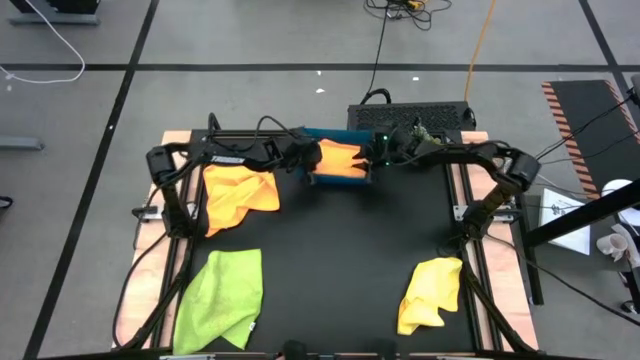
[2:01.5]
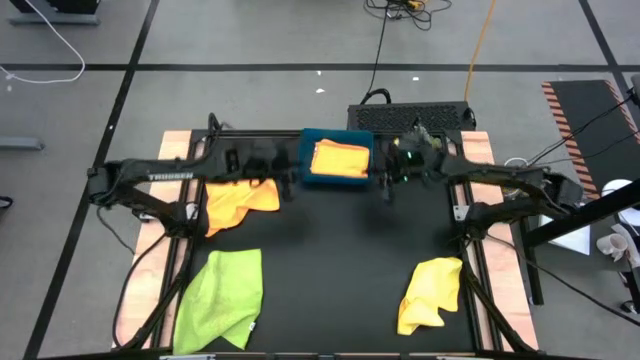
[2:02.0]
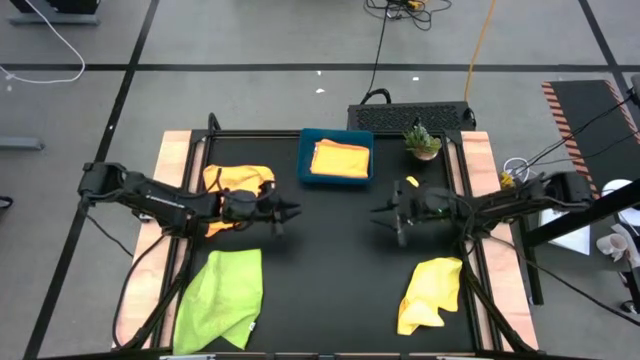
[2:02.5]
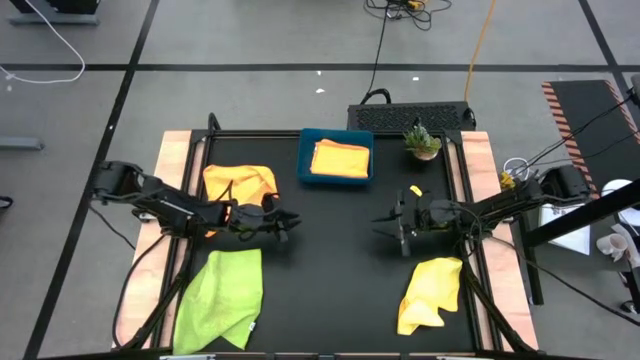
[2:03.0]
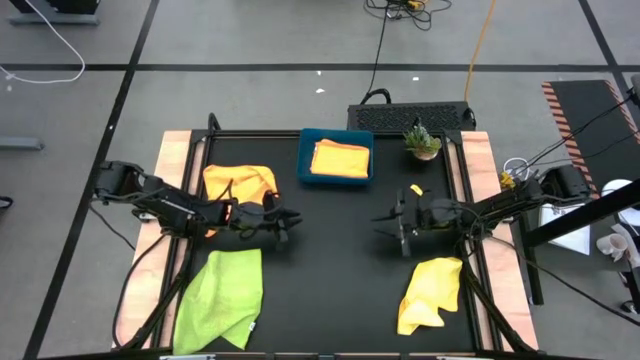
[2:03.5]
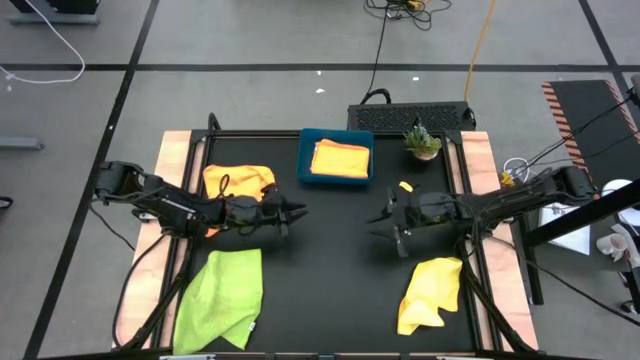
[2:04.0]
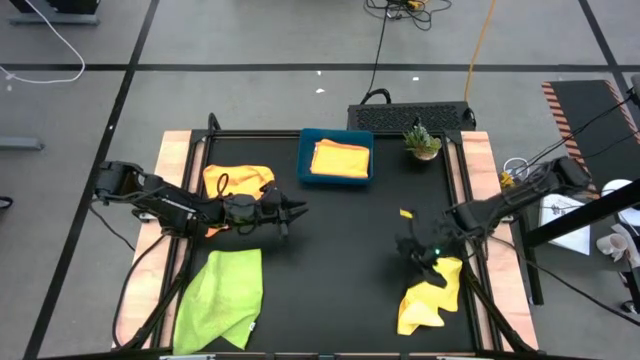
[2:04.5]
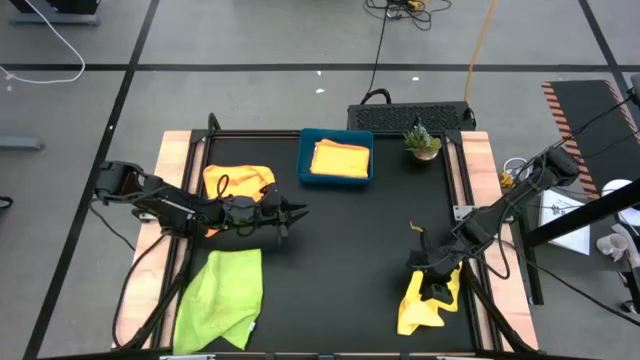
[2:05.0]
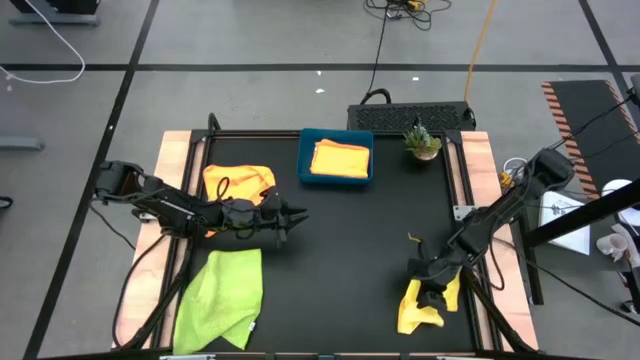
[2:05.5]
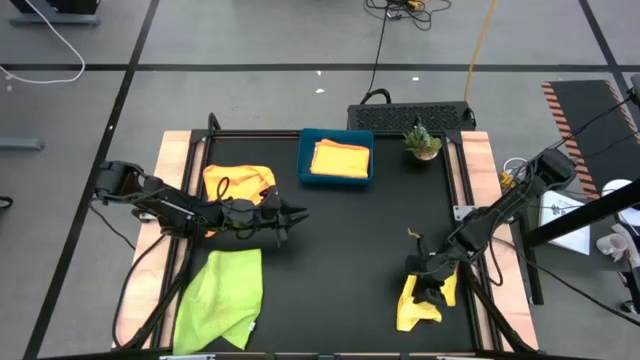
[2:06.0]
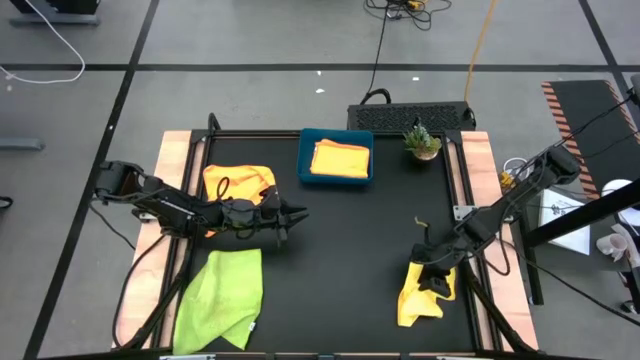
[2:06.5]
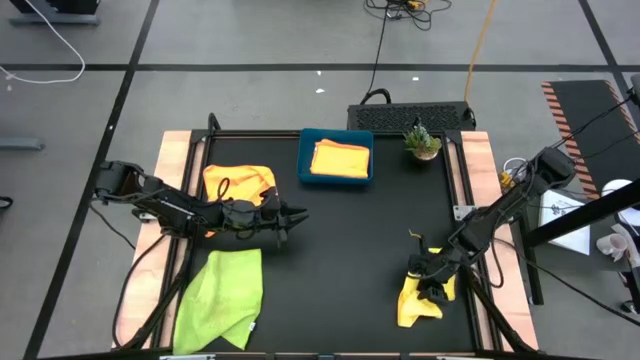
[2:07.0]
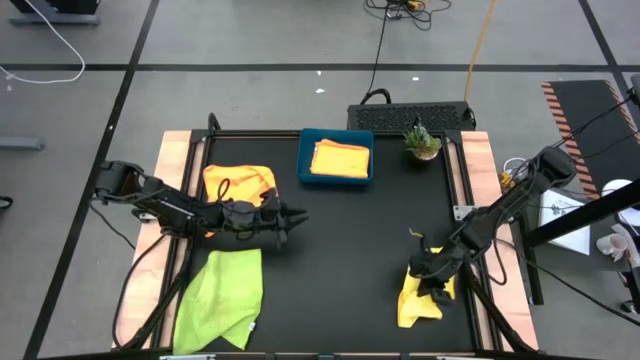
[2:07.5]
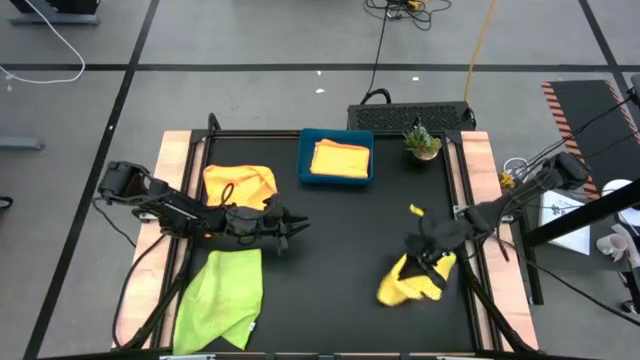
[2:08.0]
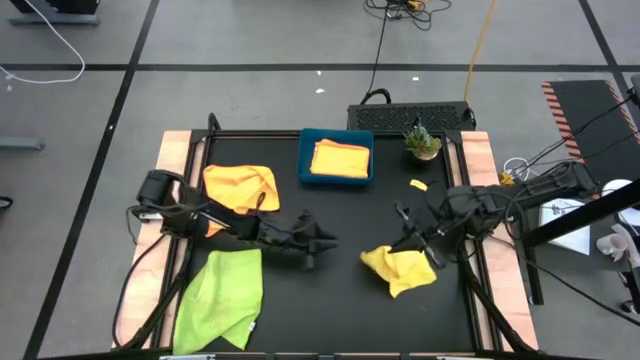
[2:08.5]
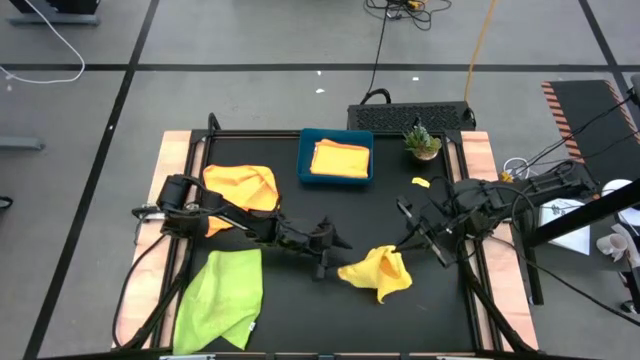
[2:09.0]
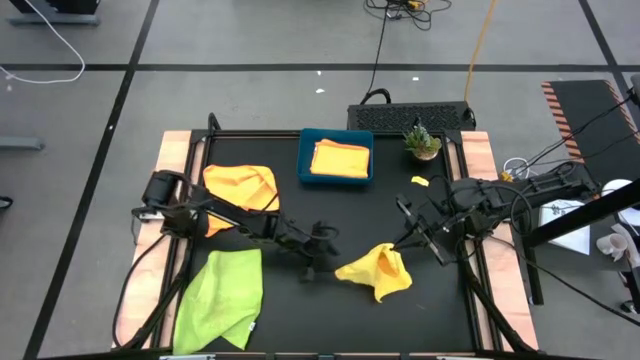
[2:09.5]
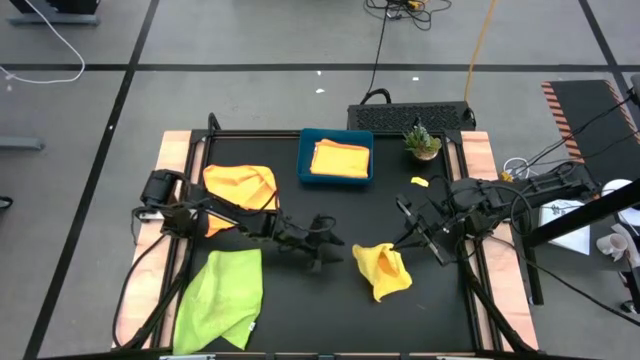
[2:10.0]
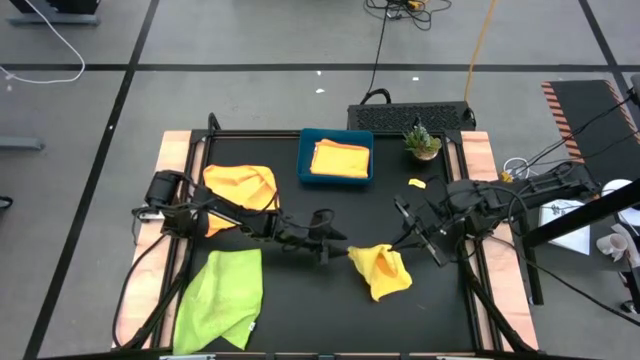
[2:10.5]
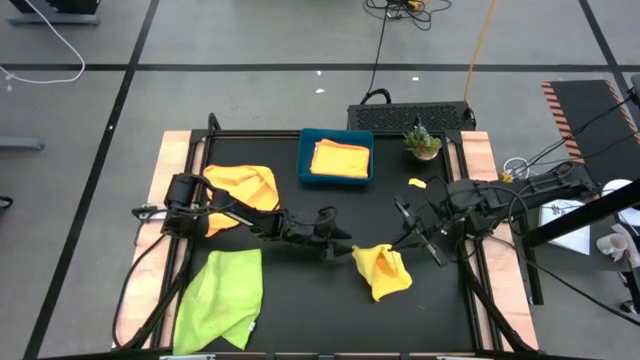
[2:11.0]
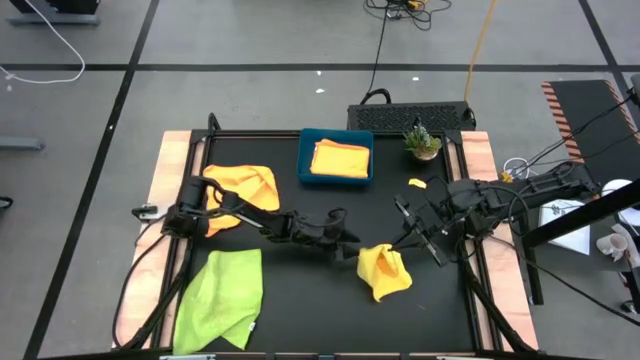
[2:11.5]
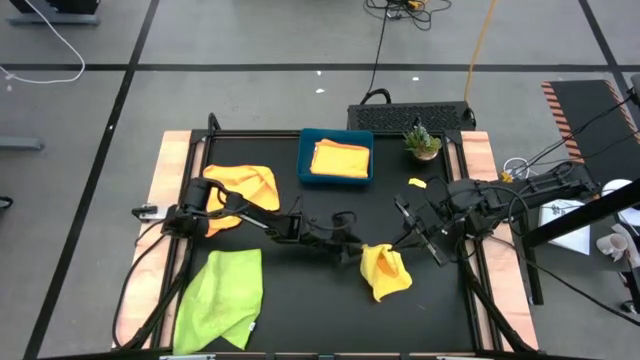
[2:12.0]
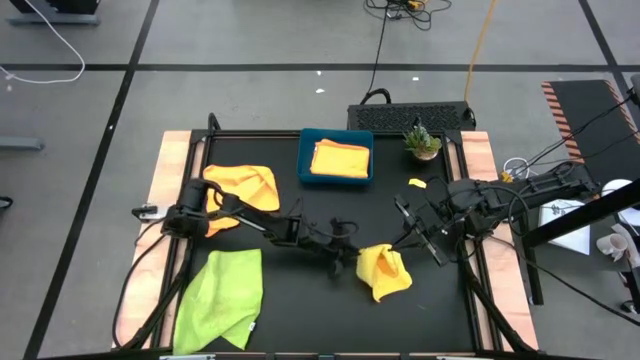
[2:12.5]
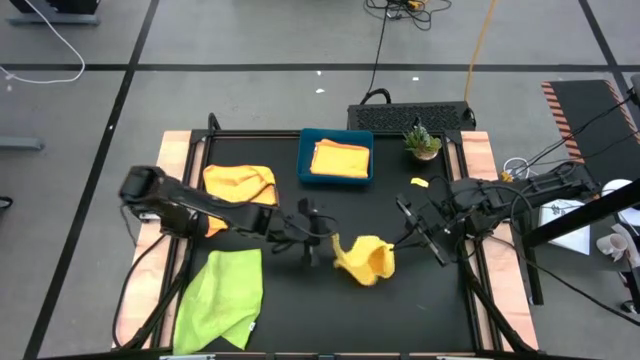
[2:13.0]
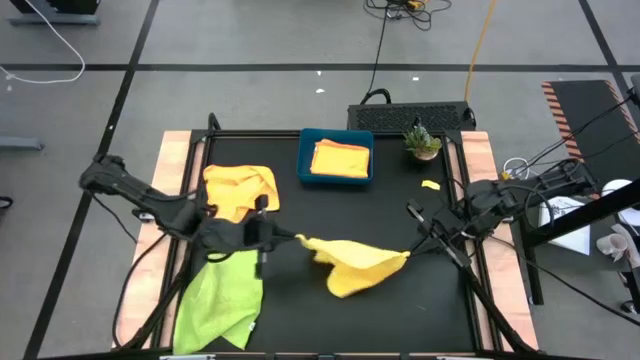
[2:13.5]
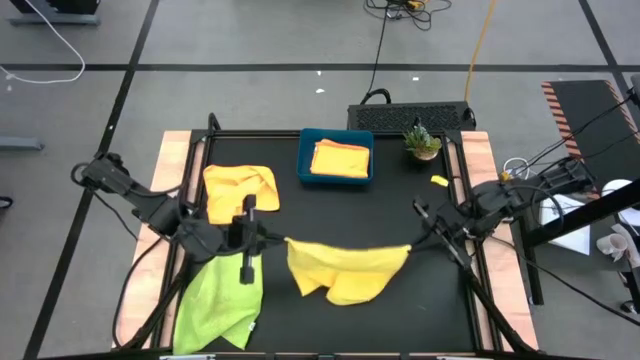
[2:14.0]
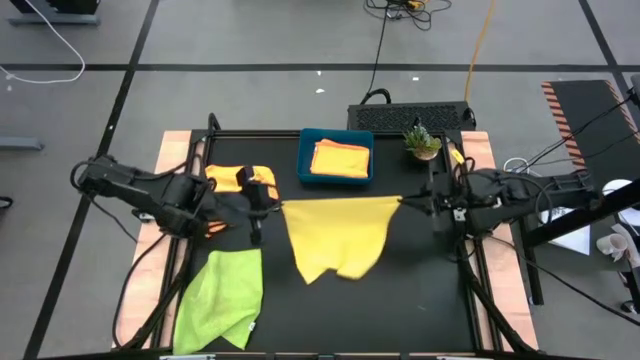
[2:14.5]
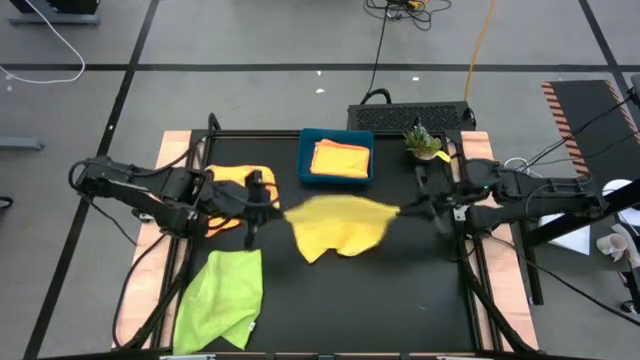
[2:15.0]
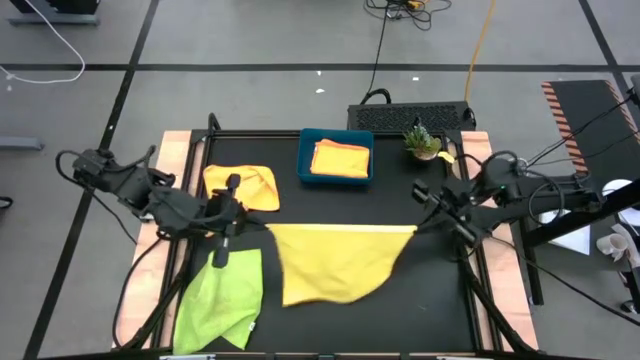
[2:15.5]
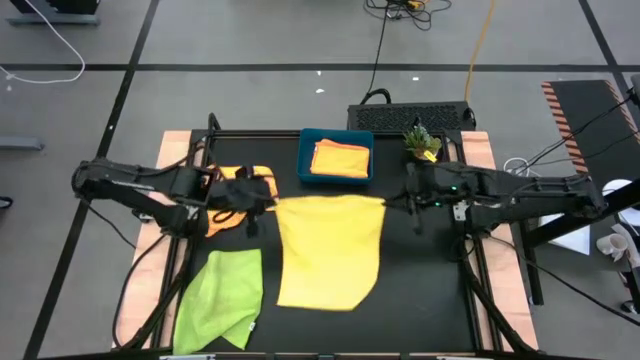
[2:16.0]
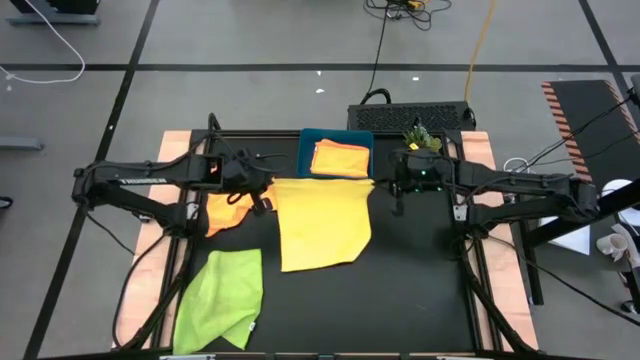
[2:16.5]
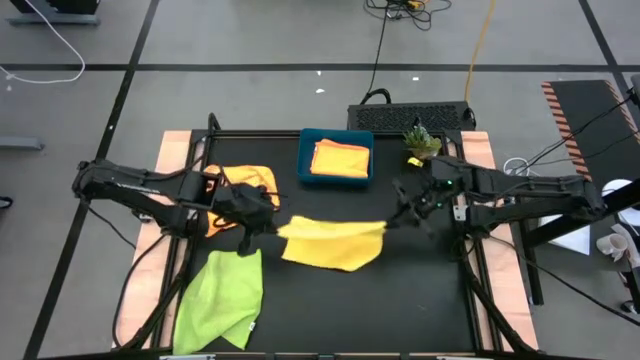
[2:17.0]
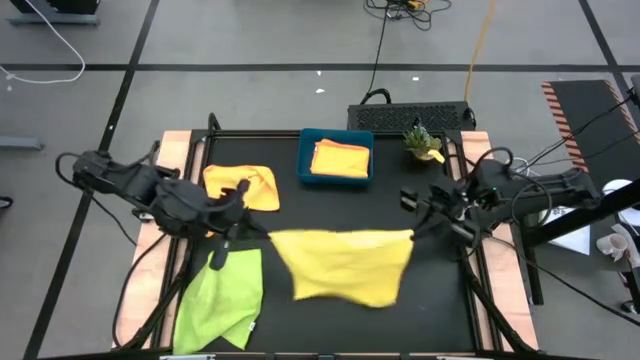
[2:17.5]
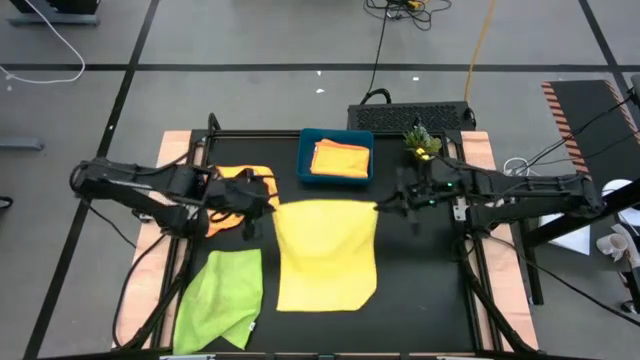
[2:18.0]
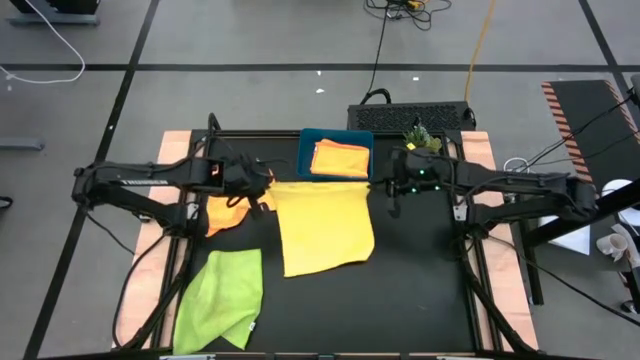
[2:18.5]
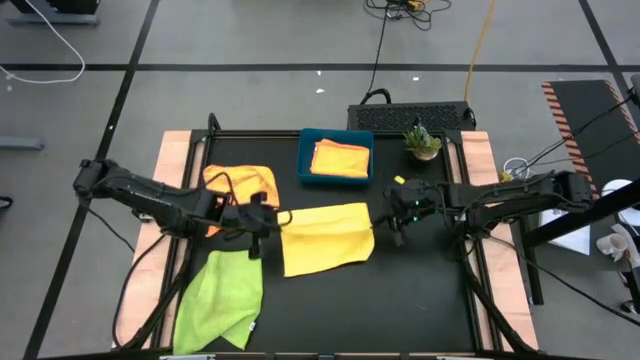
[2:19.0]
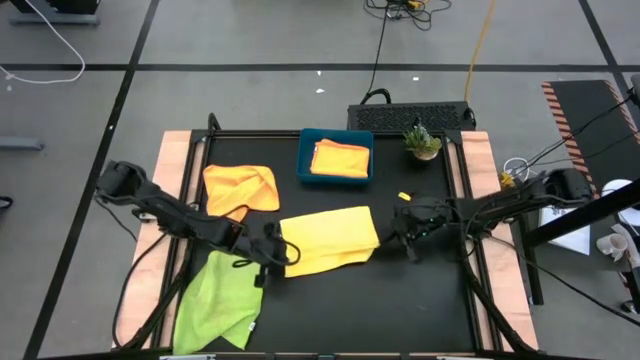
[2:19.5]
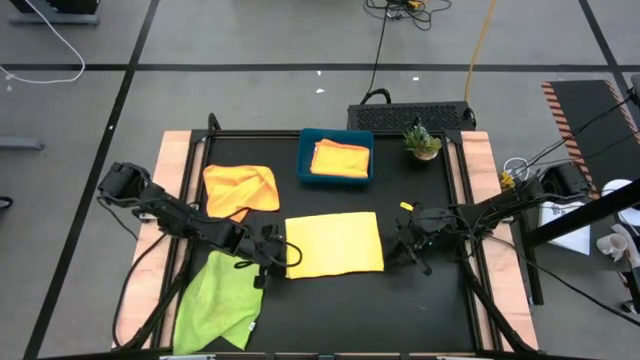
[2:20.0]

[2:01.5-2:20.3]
Task: Fold microfiber towels
Fold the yellow microfiber cloth

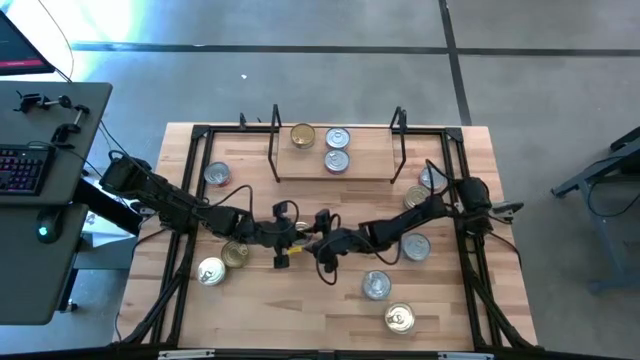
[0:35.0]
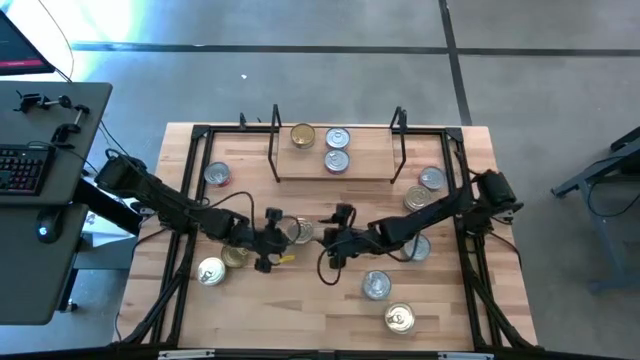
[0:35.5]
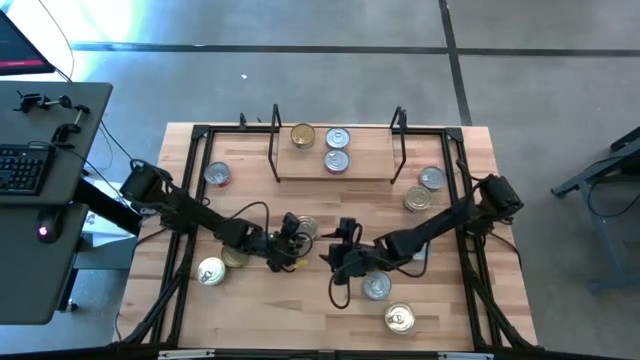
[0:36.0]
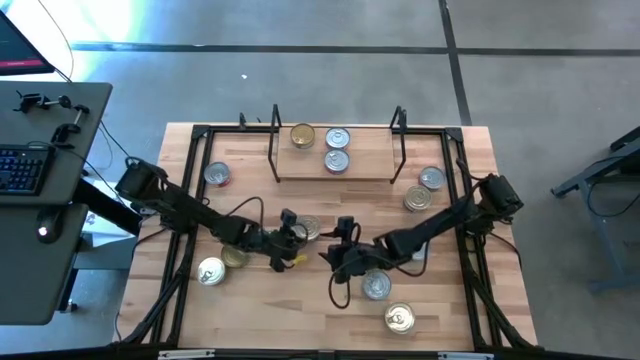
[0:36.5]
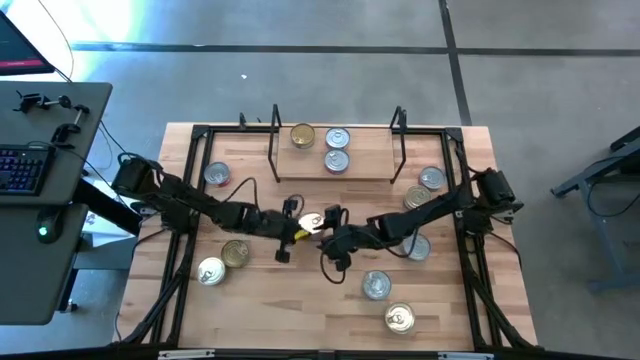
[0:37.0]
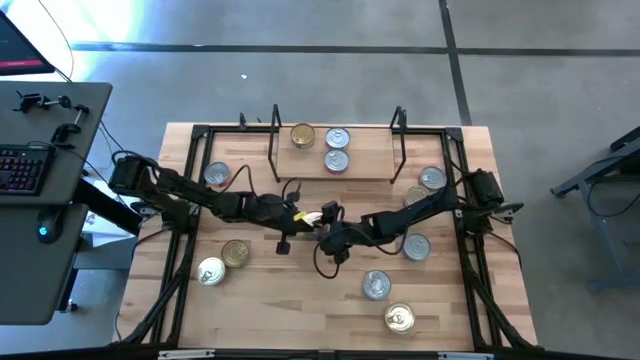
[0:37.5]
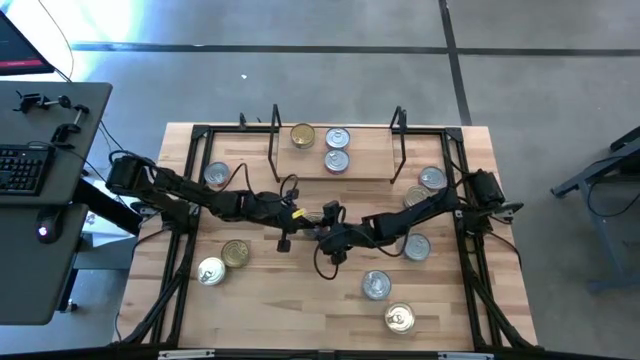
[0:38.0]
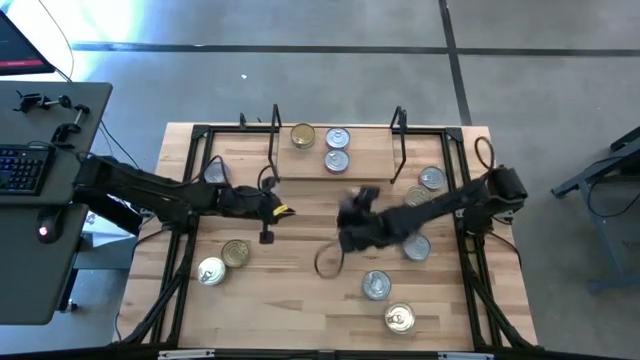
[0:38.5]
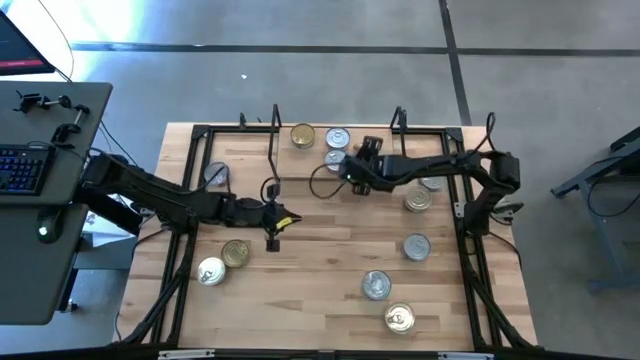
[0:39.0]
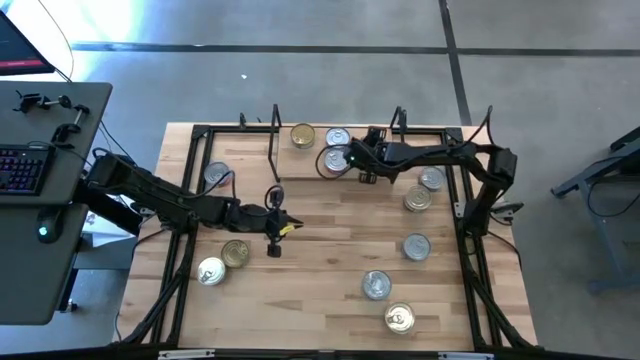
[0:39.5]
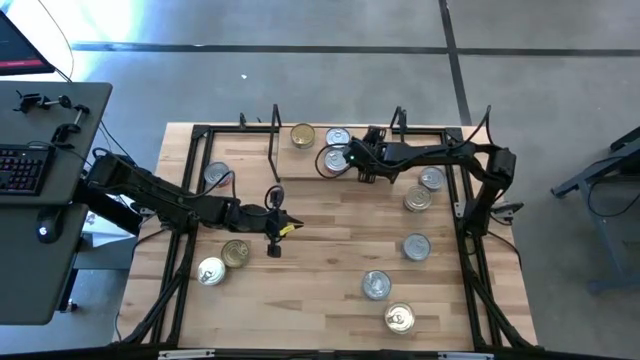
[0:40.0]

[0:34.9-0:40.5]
Task: Stack canned seafood by type on shelf
Put the blue-pink tuna can on the shelf
